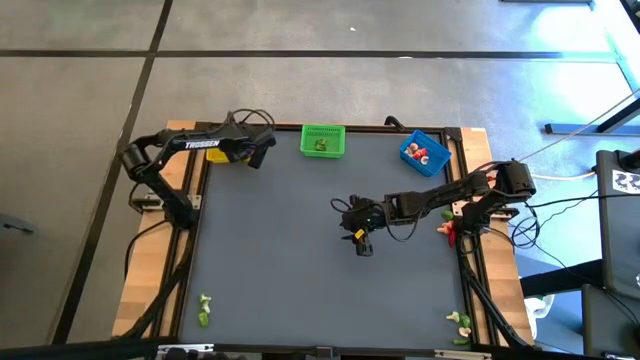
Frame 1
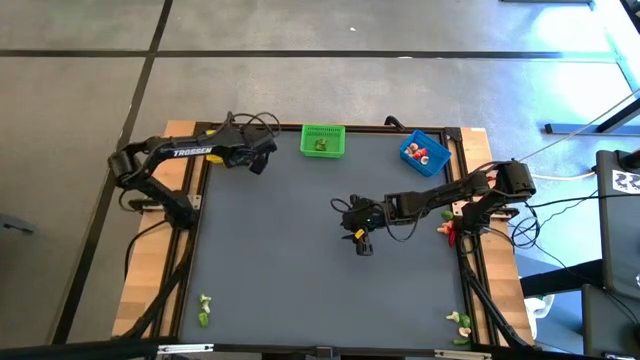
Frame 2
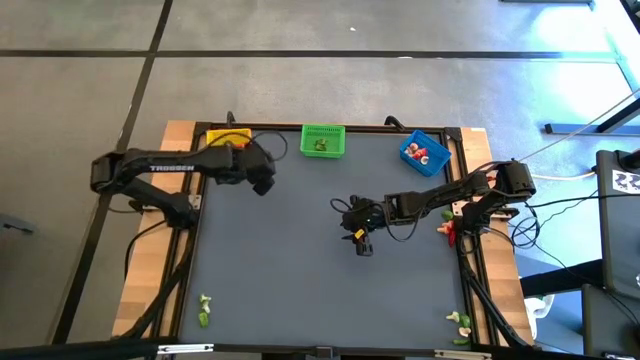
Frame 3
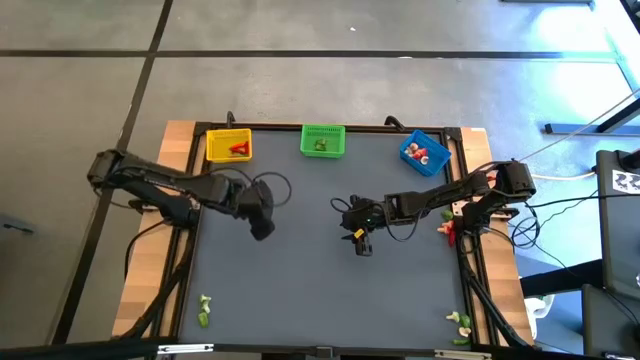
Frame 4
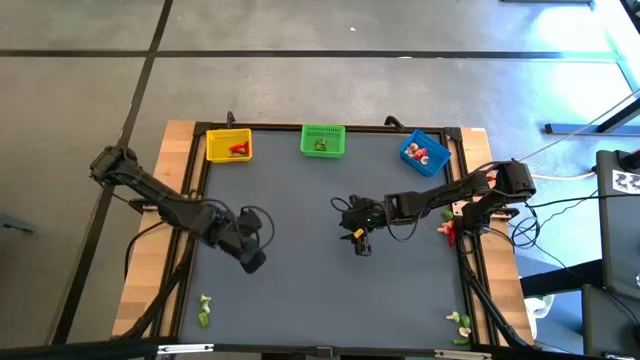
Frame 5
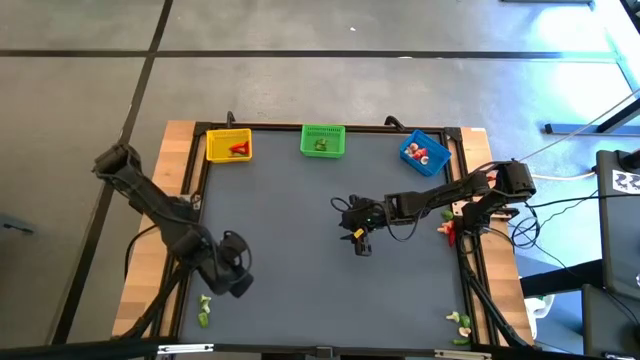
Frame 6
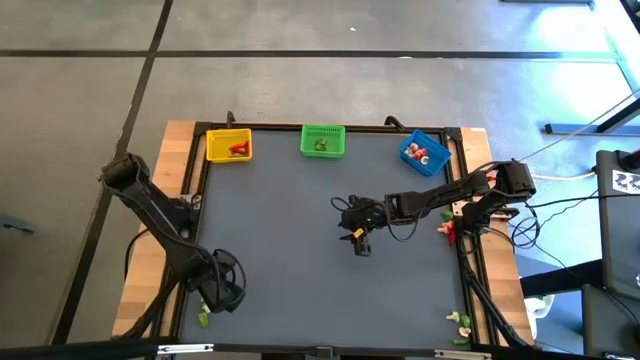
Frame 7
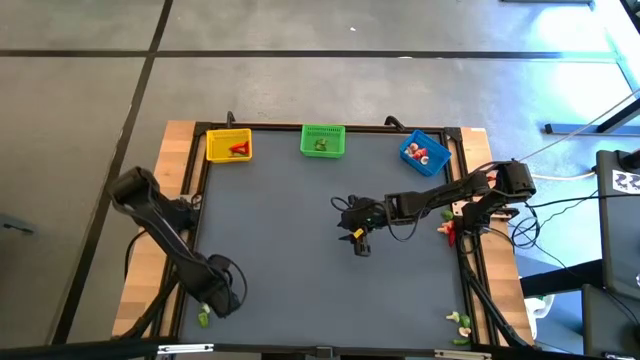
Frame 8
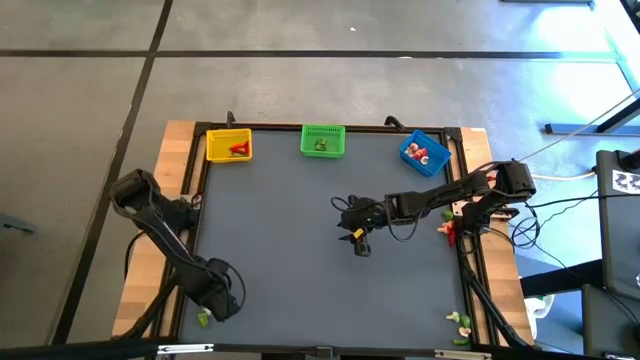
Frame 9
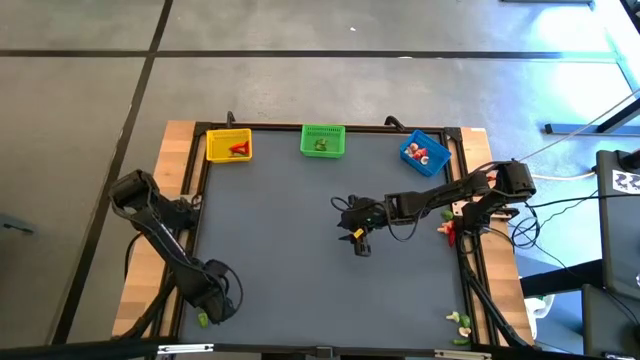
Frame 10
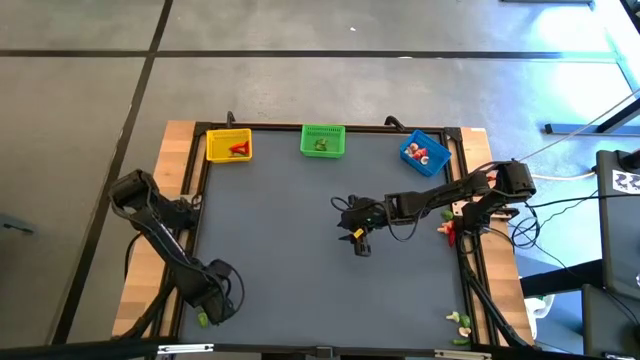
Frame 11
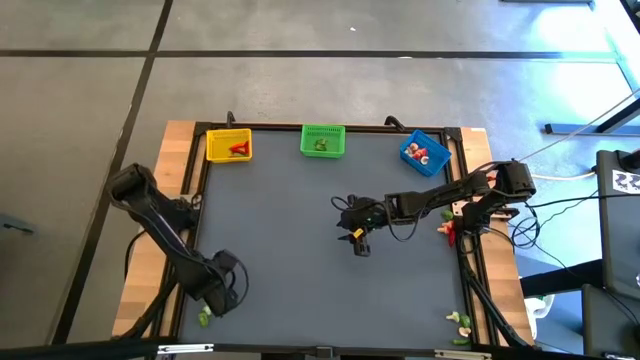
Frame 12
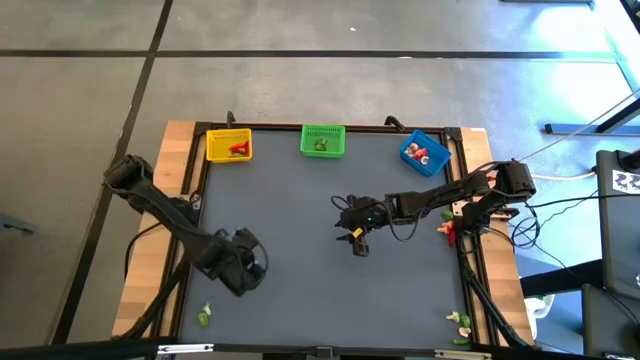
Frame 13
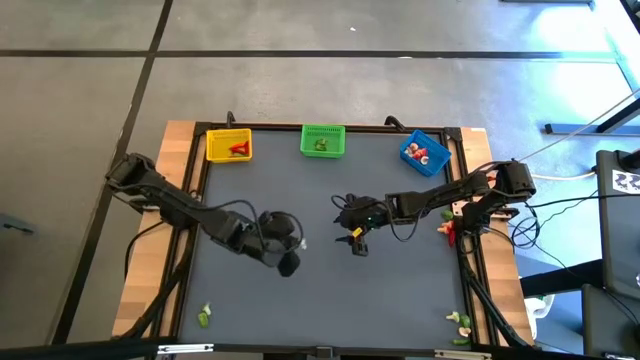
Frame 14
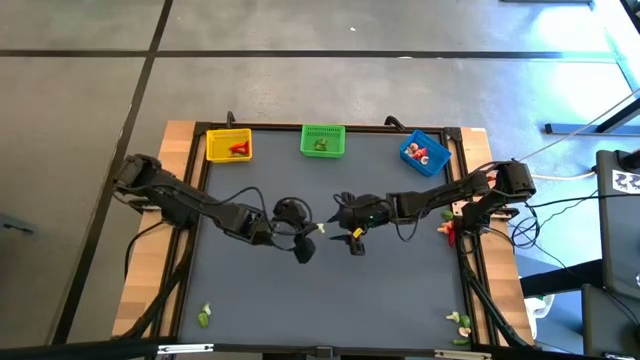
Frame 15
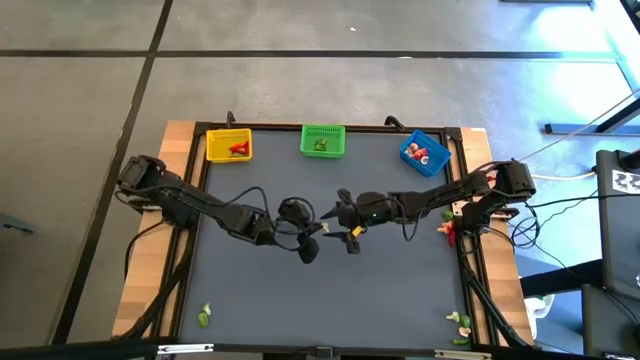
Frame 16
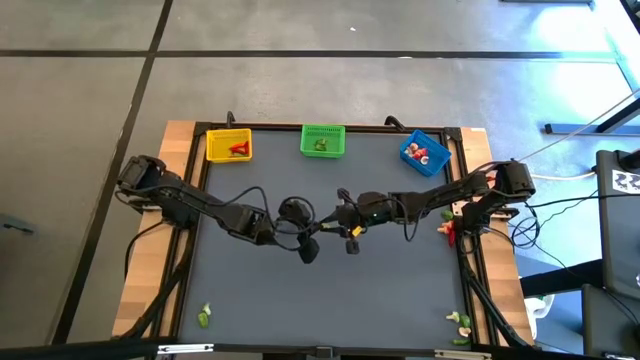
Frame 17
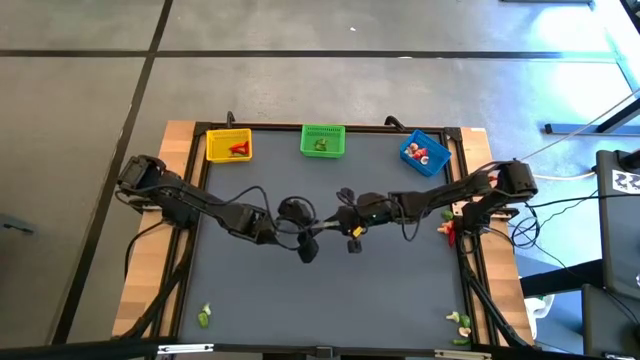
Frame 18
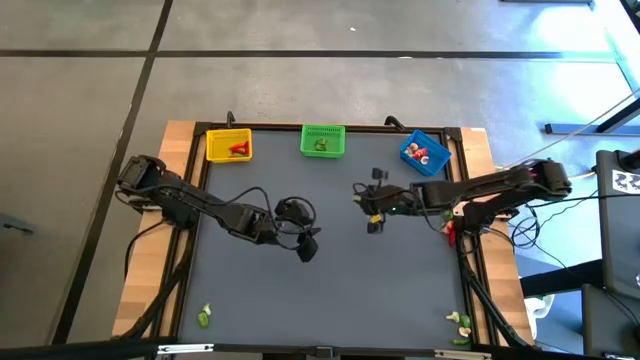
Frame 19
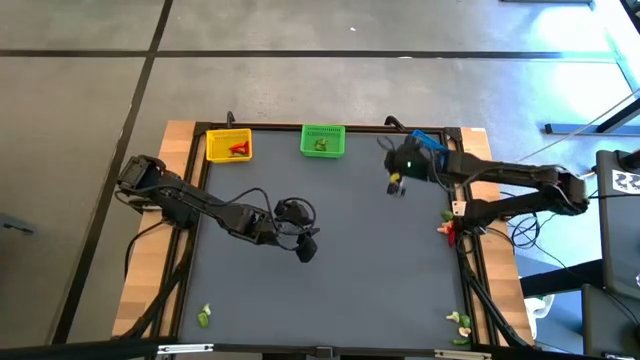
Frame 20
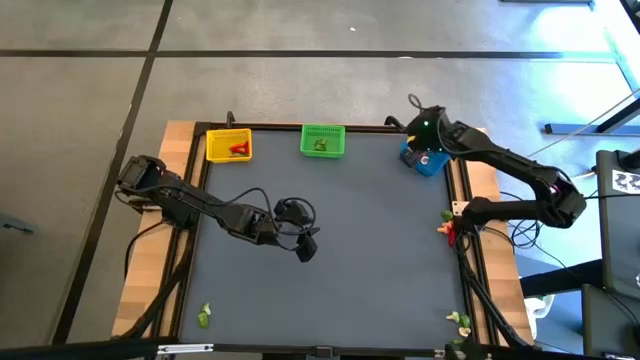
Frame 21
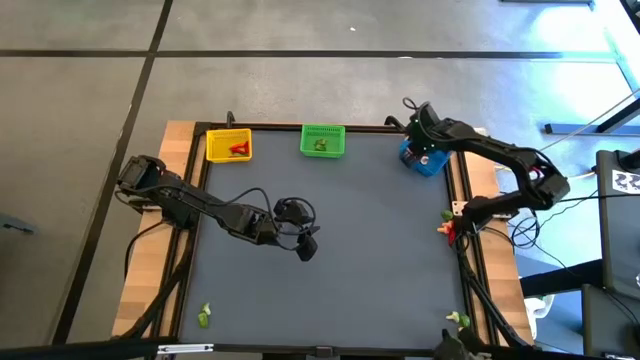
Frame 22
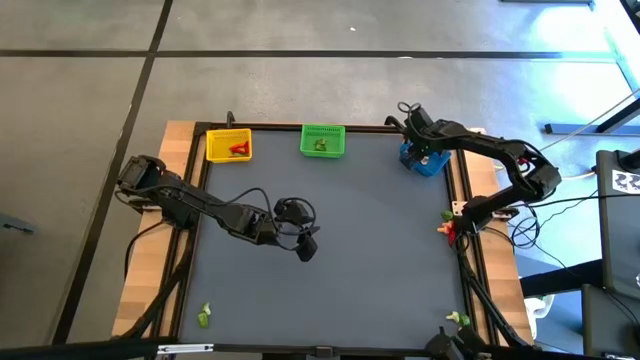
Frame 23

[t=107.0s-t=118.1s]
Task: Sort produce into baskets
Put the green mushroom into the blue basket

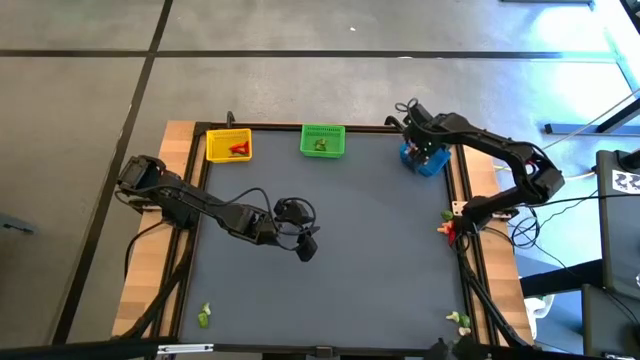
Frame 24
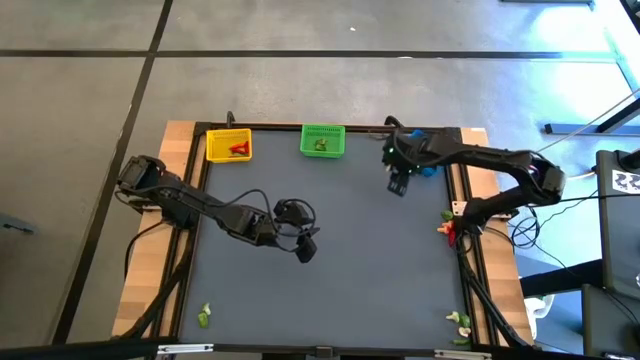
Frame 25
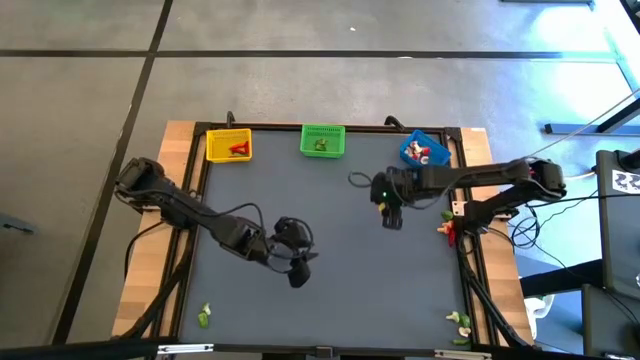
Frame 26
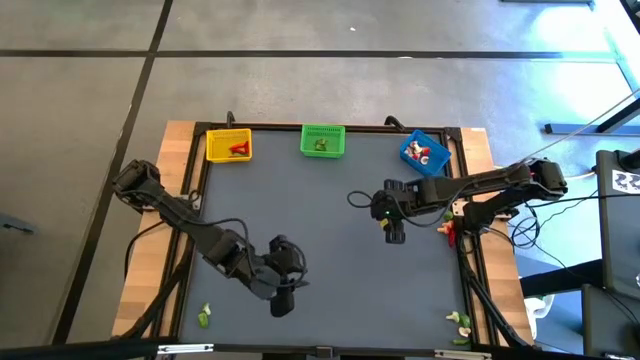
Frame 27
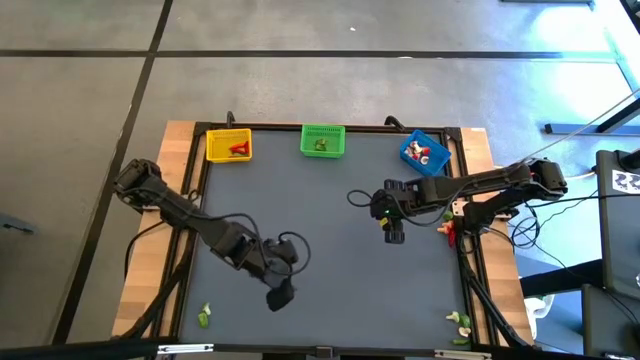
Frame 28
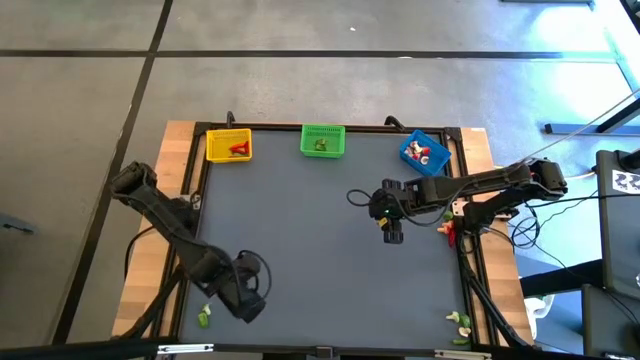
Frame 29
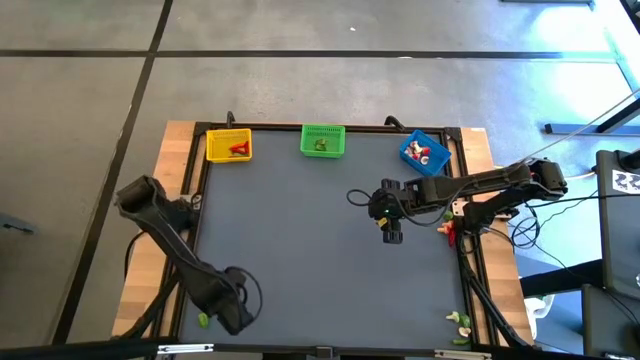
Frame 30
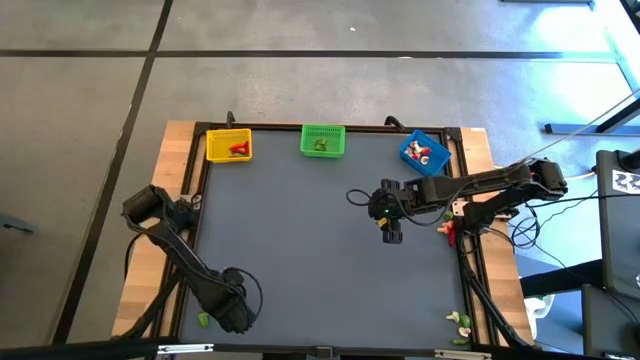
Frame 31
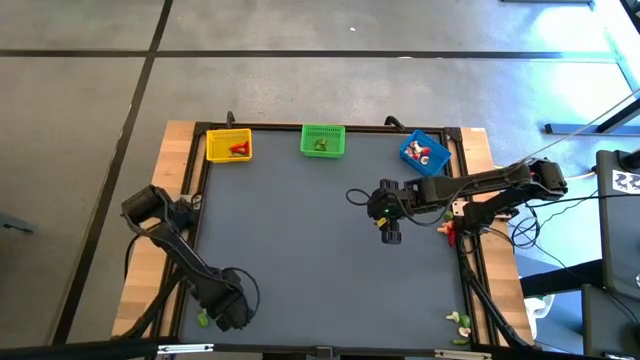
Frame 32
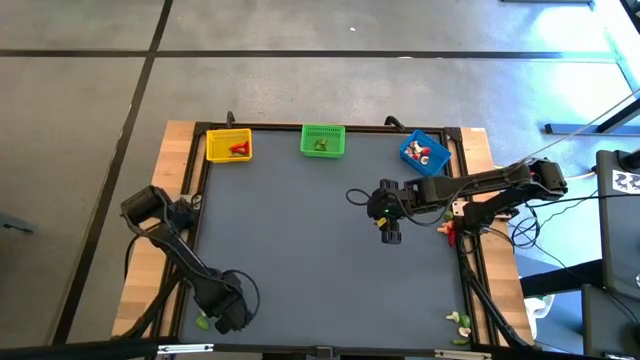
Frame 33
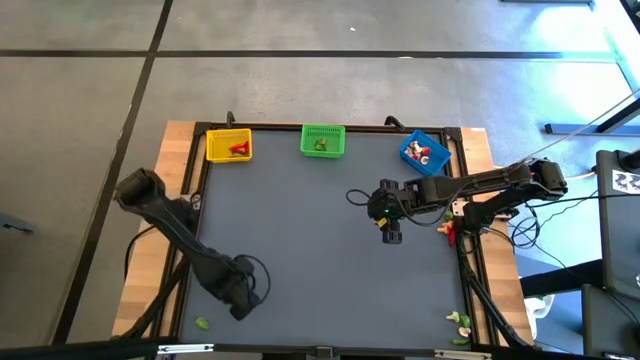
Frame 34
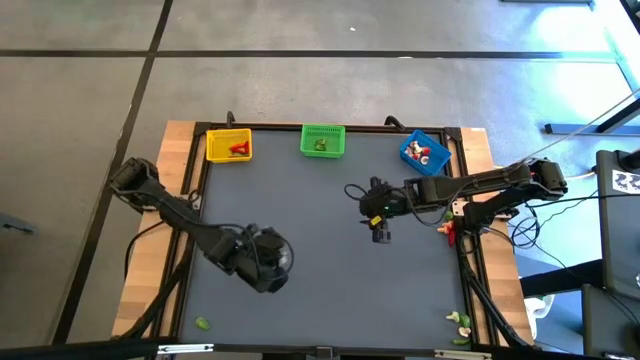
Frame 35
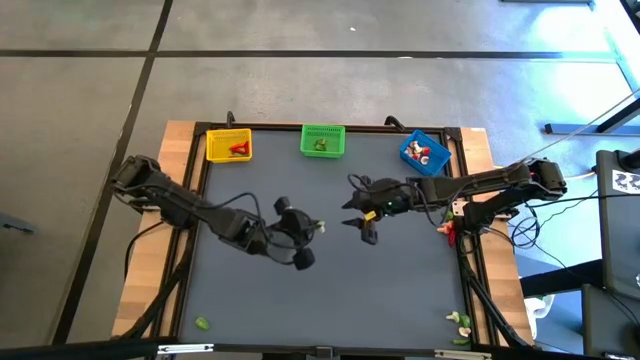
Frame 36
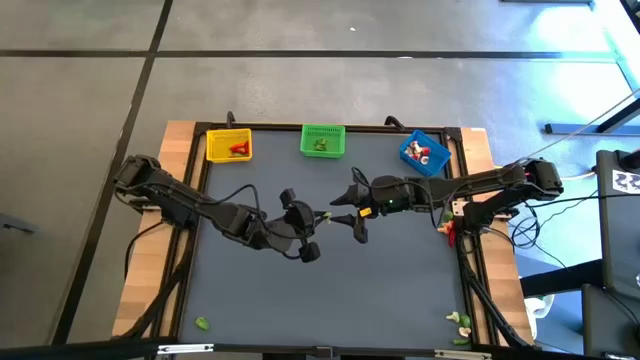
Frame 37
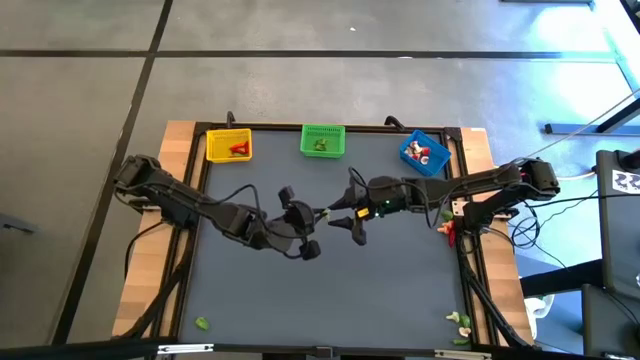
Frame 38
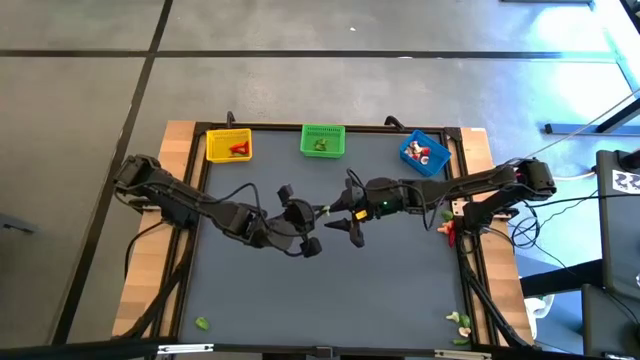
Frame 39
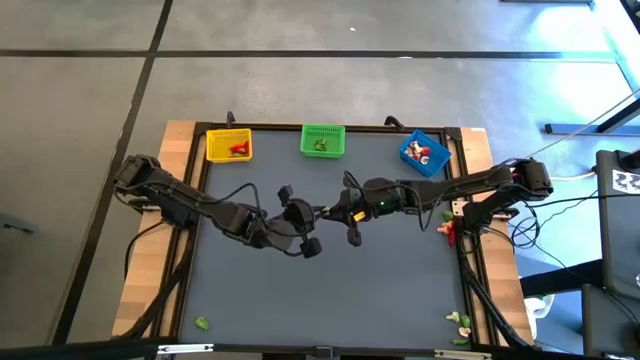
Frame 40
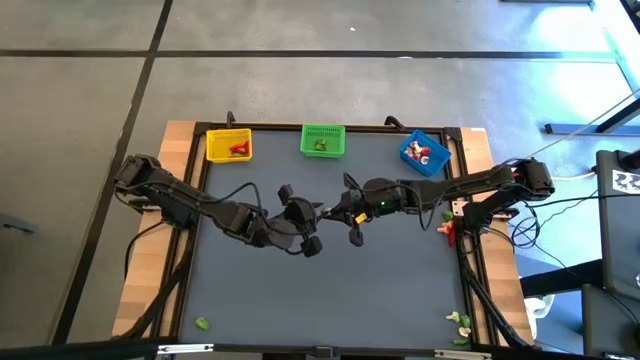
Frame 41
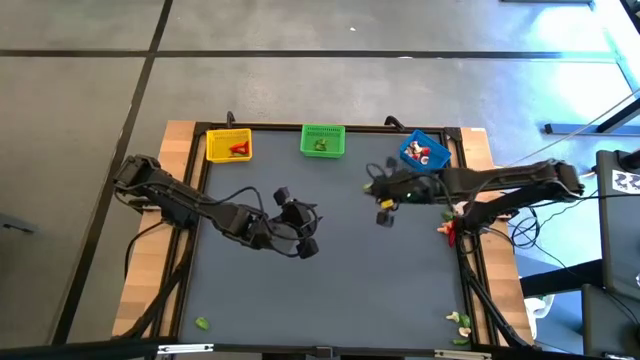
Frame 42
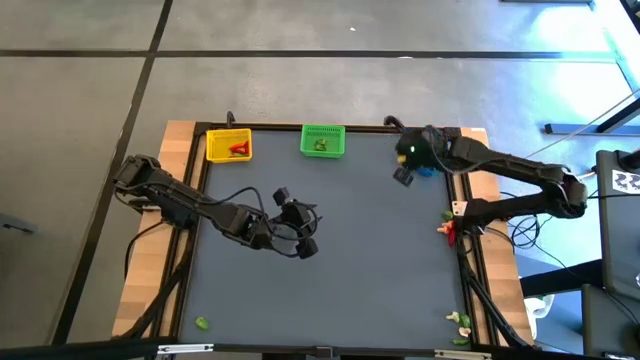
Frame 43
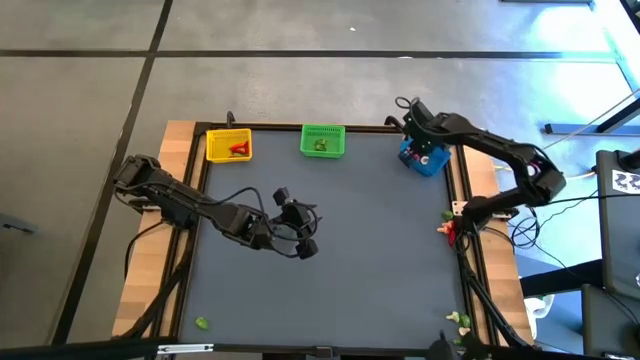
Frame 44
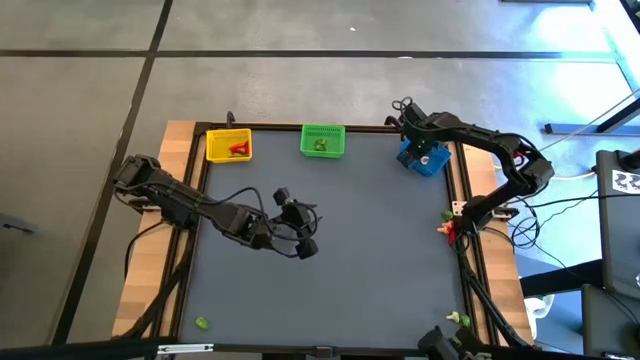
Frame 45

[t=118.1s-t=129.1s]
Put the green mushroom into the blue basket
